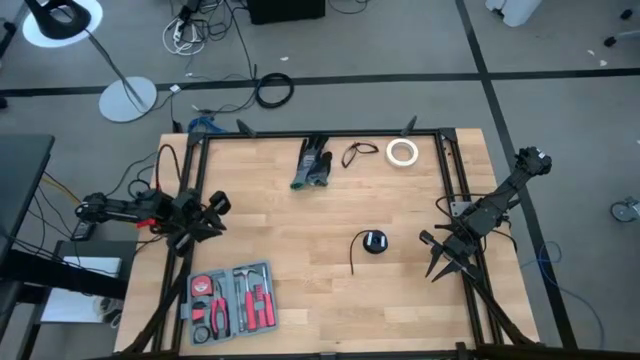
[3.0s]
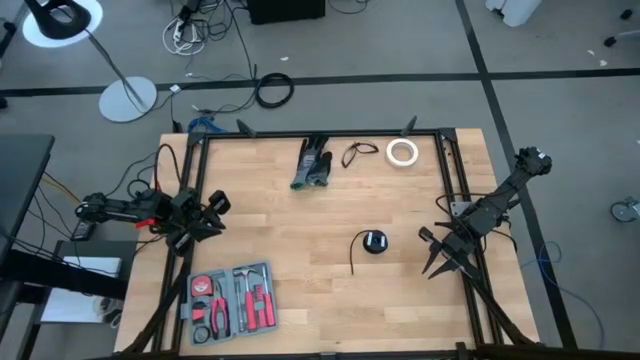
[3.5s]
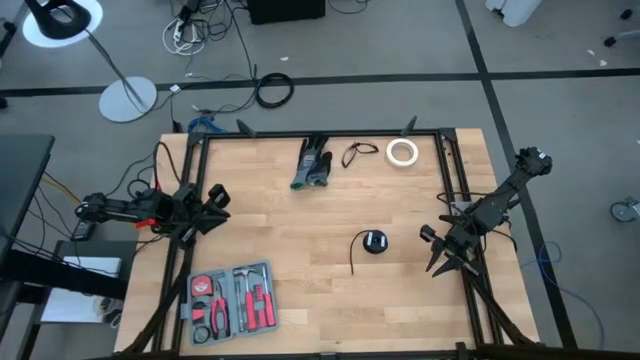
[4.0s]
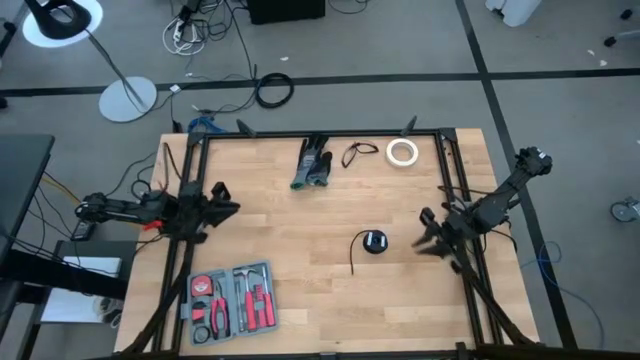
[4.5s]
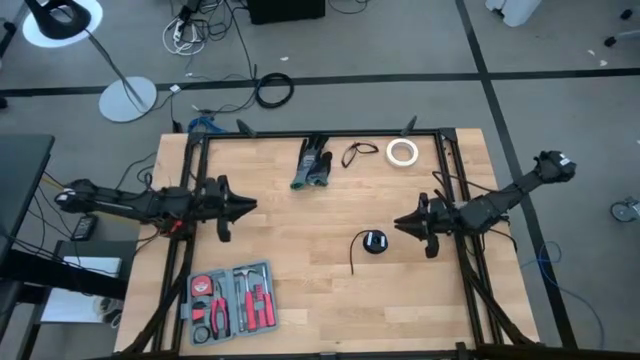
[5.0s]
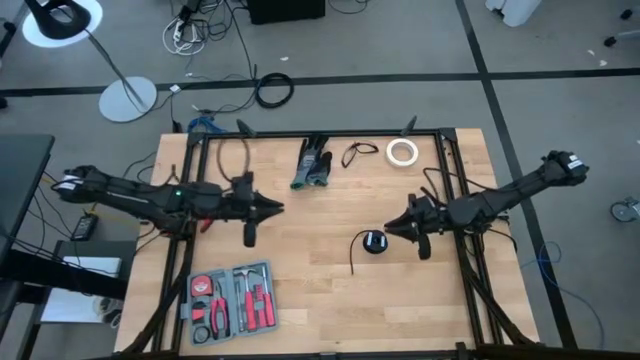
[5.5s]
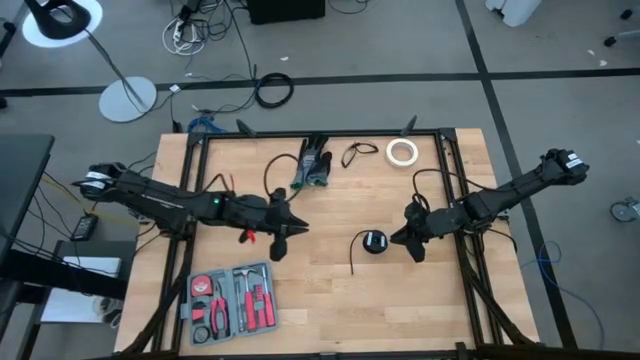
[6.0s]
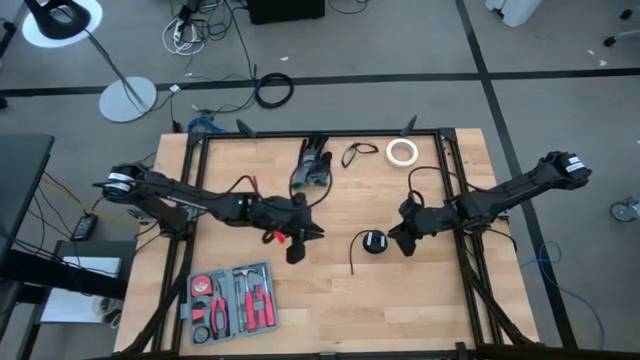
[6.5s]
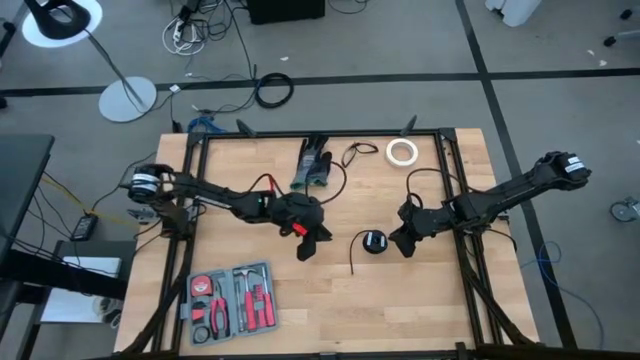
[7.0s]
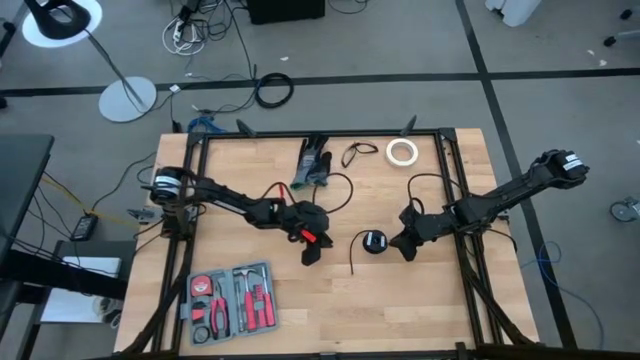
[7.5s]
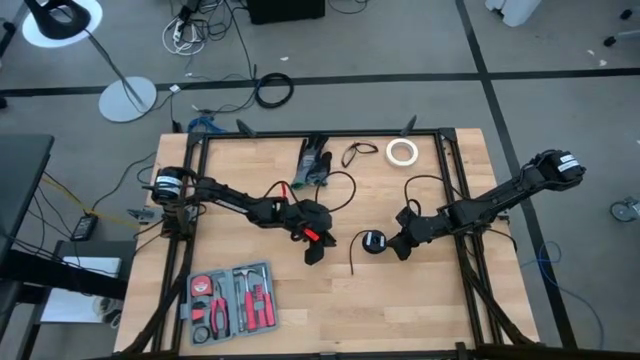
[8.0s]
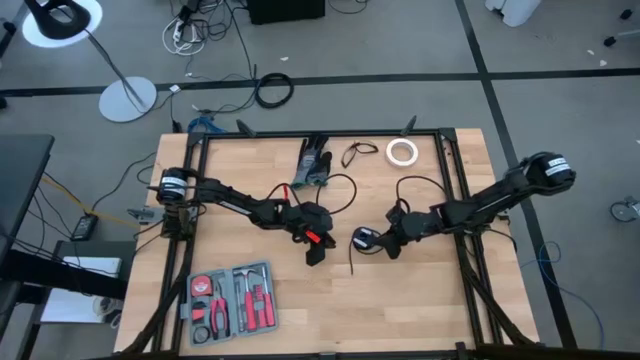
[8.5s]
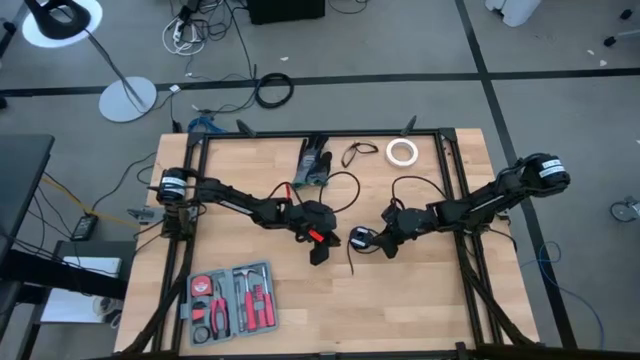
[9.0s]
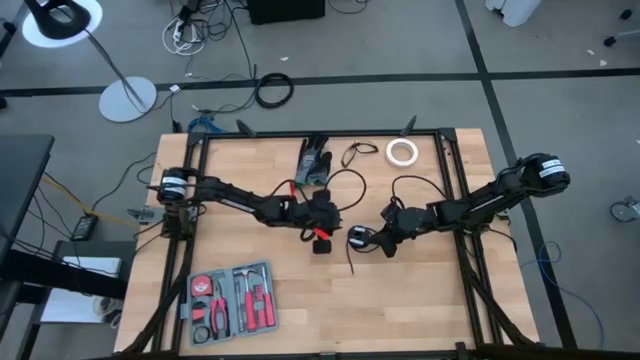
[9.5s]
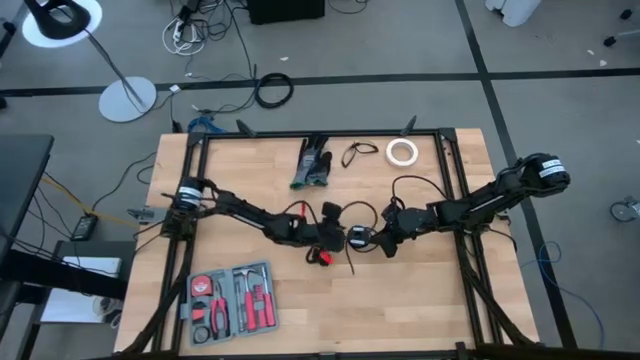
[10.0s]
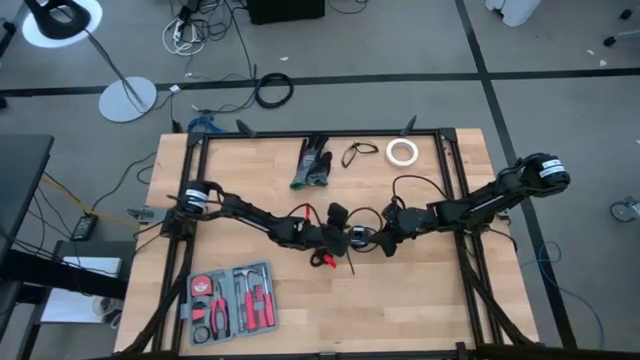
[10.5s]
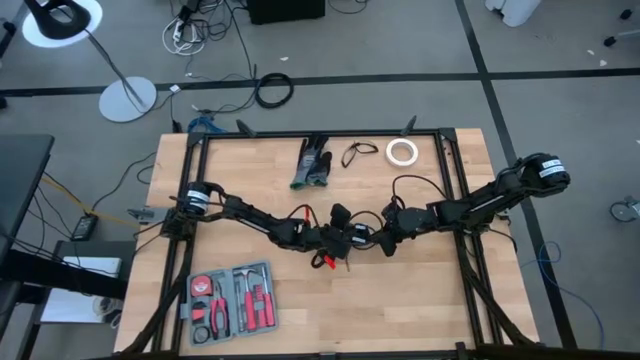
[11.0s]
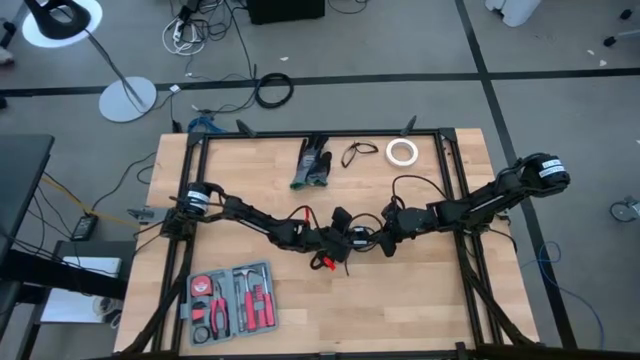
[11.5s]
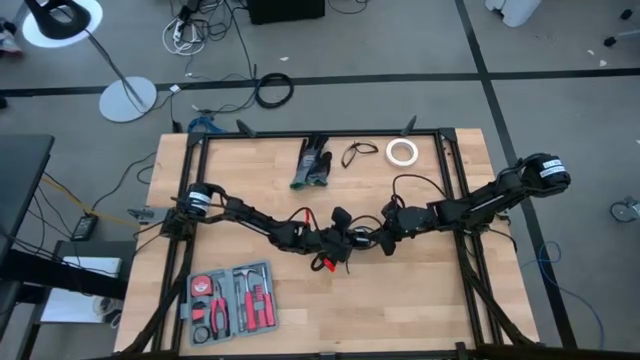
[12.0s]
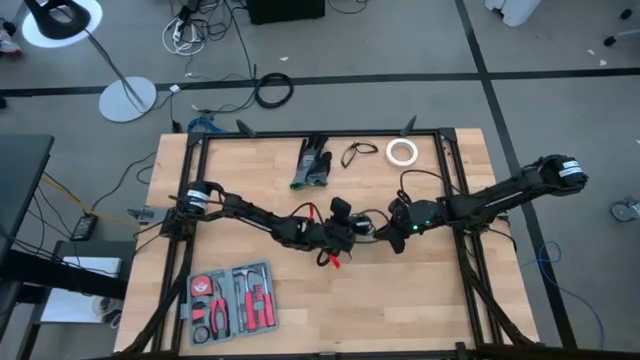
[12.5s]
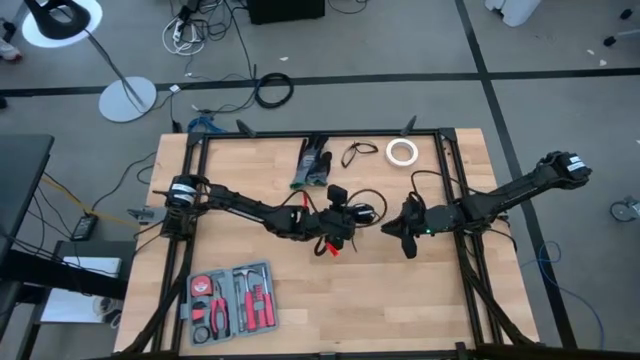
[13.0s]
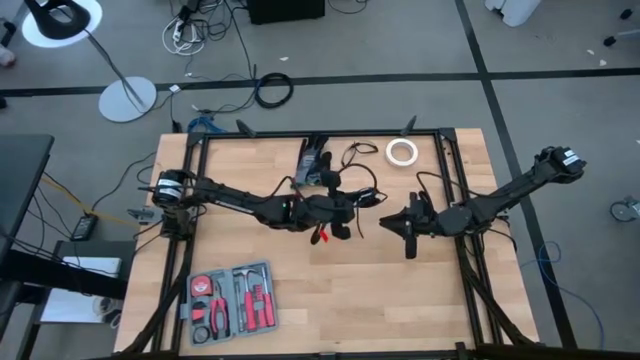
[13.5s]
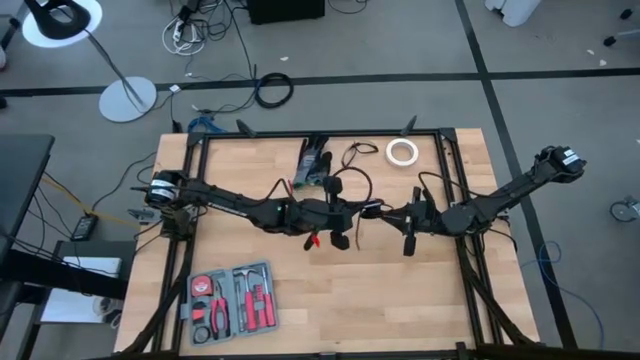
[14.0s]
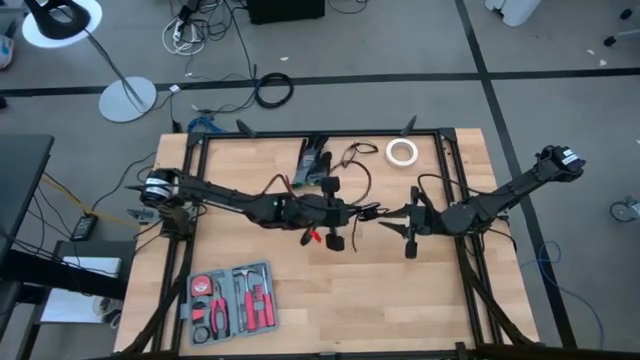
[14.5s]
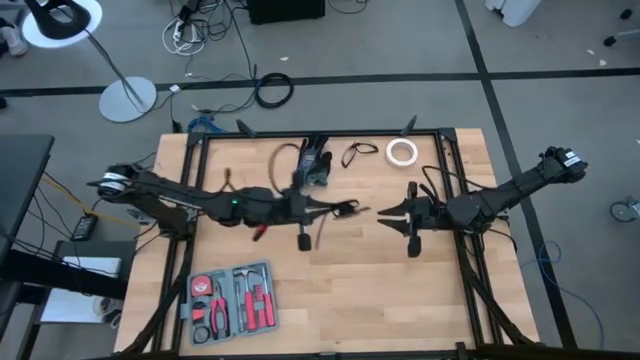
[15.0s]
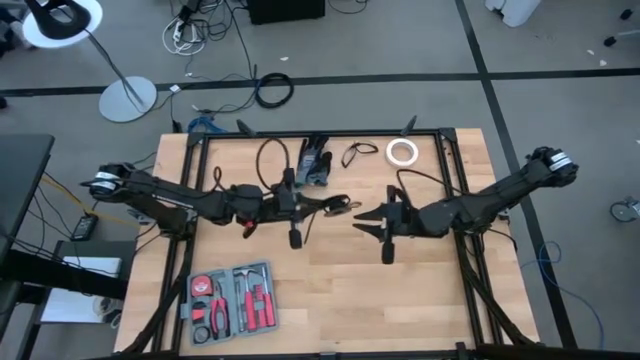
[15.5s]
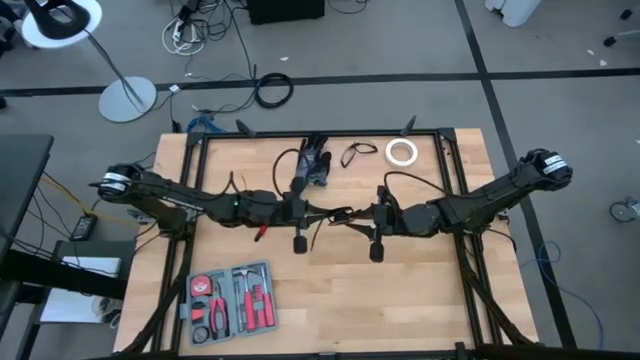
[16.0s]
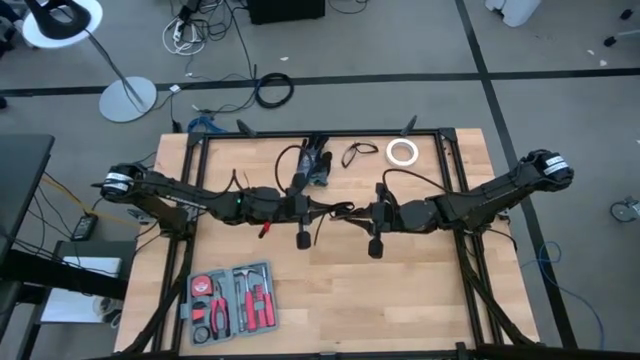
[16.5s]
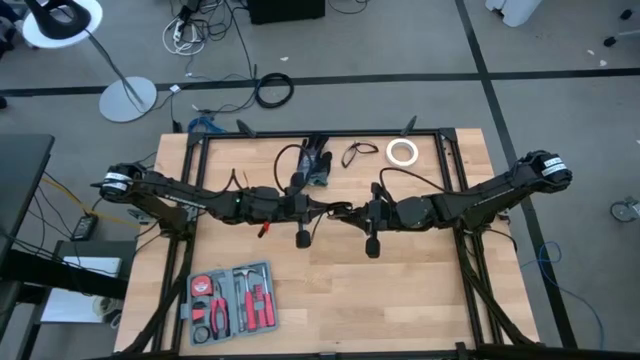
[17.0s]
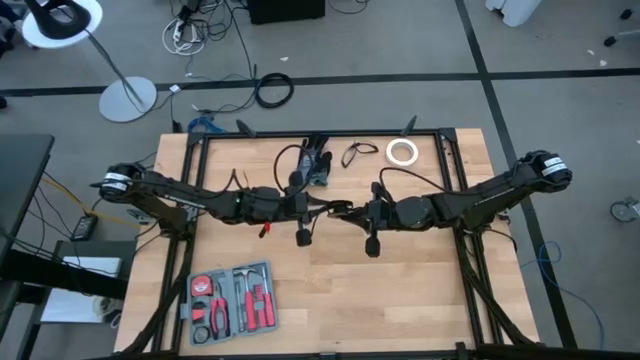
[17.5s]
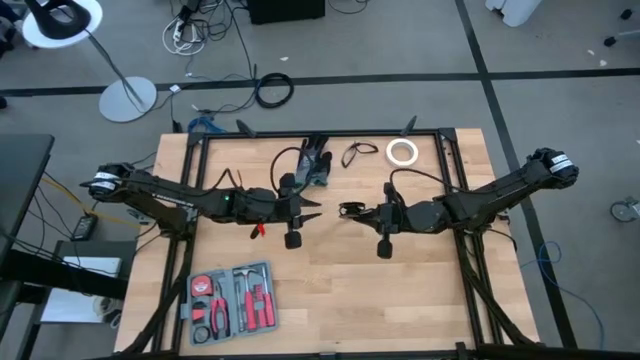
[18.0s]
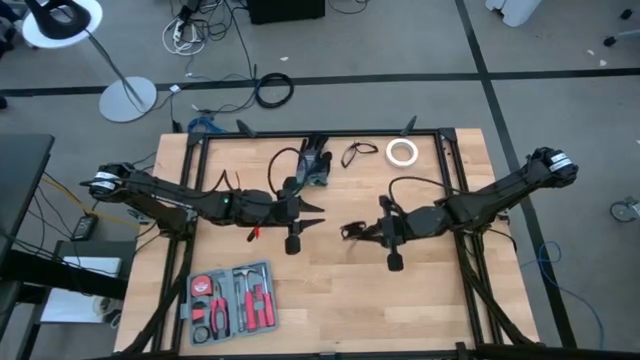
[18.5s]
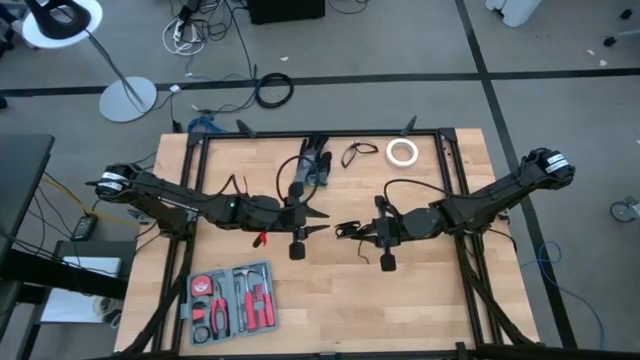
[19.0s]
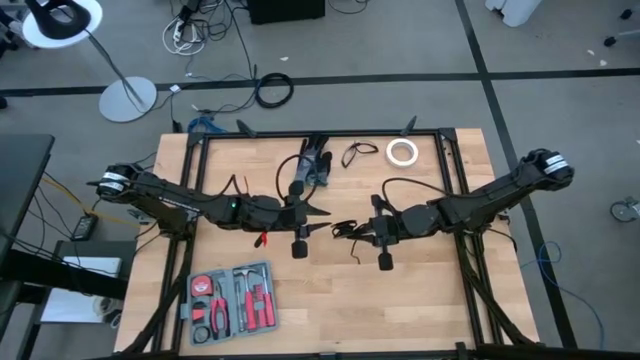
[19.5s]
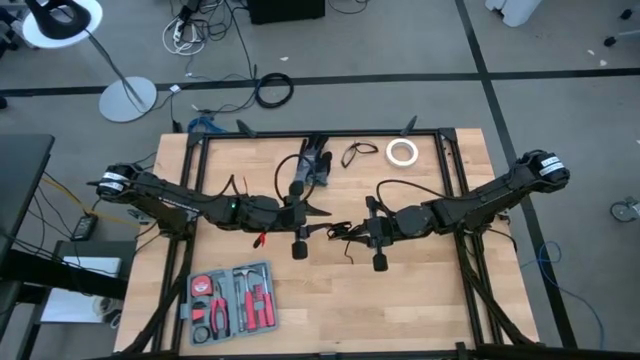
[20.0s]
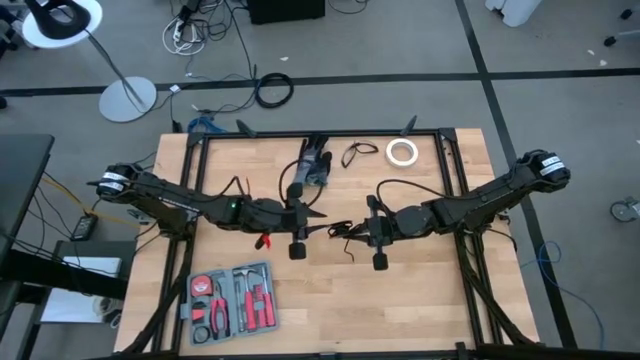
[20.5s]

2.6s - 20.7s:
Task: Coil cords
Uncoil the black wire from the spool

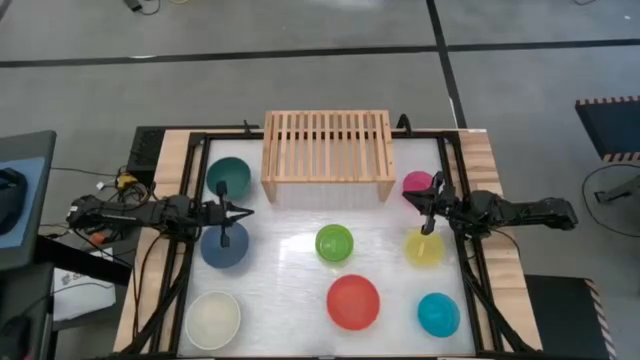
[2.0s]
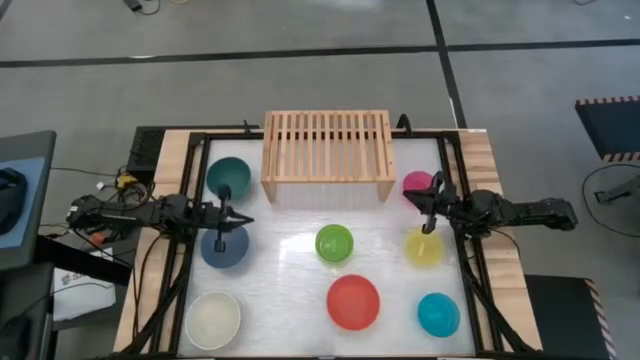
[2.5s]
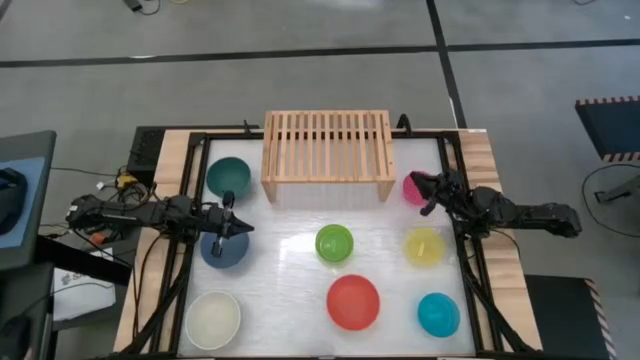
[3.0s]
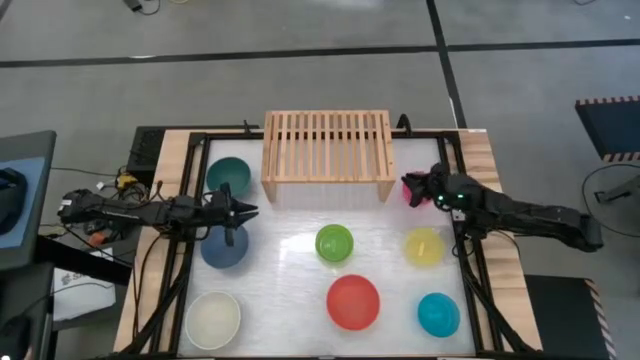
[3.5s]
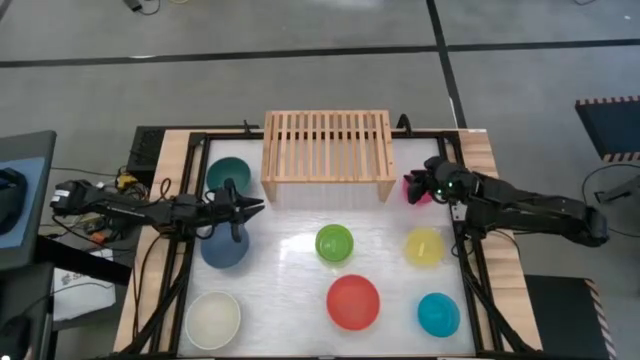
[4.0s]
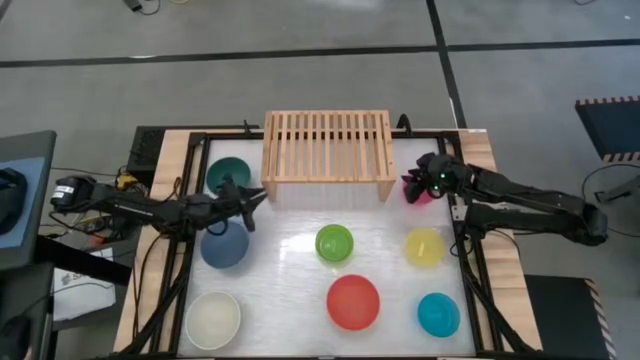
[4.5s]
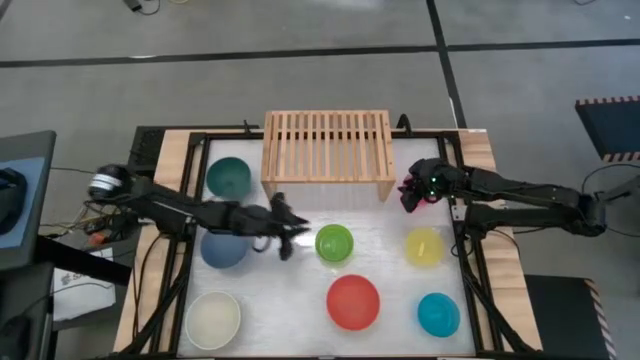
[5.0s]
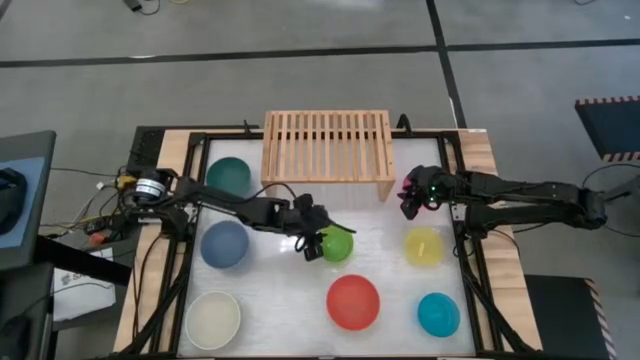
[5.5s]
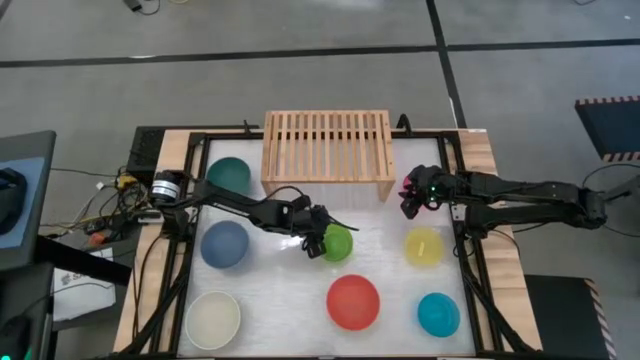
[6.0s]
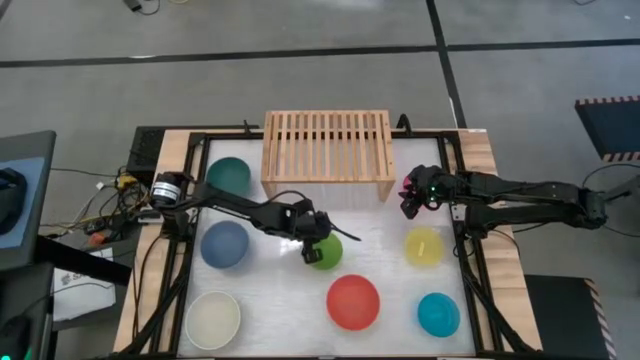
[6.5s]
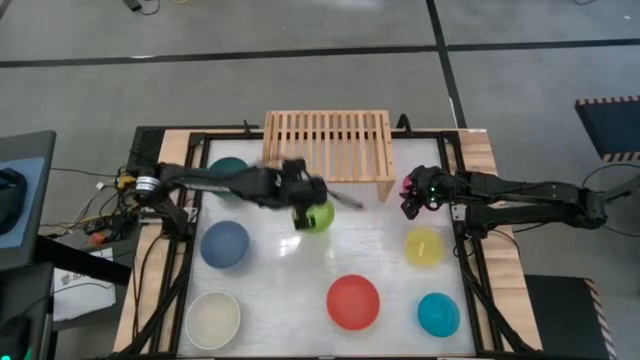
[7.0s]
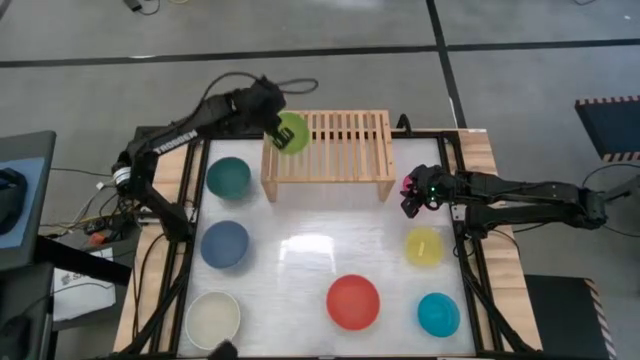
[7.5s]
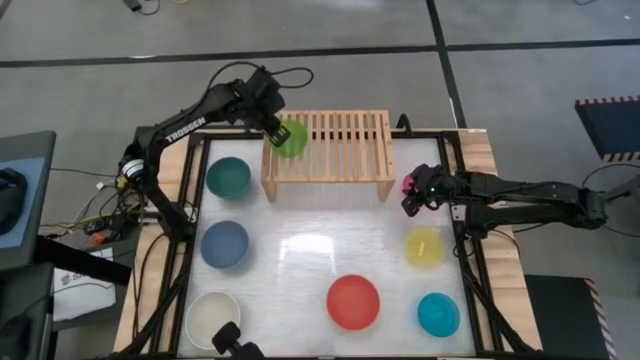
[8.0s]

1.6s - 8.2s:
Task: Place and stack bowls onto a shelf
Put the green transparent bowl on the shelf
